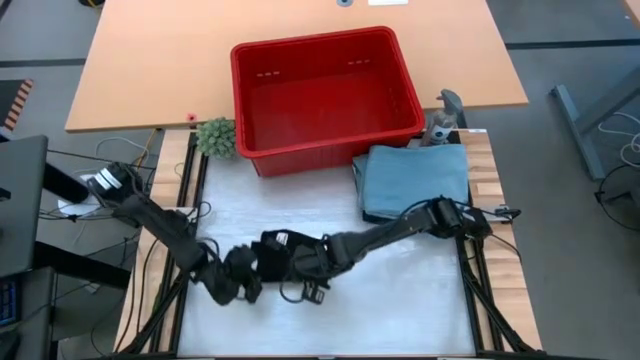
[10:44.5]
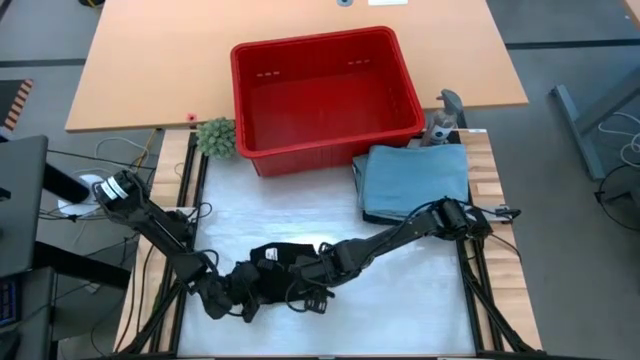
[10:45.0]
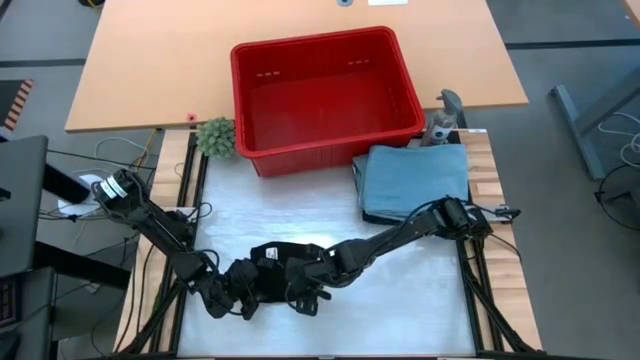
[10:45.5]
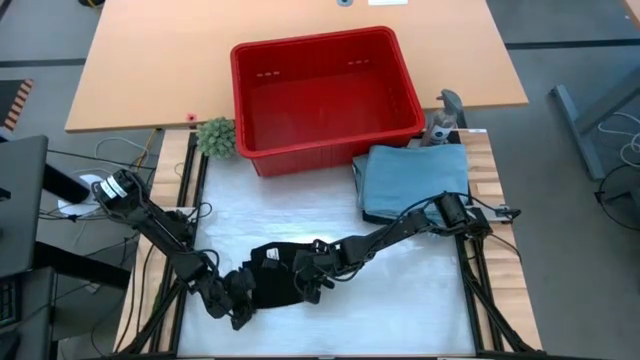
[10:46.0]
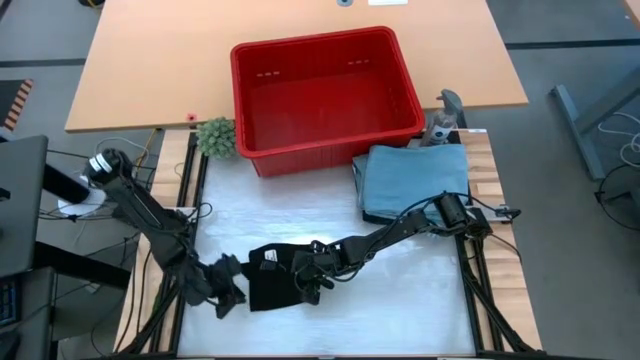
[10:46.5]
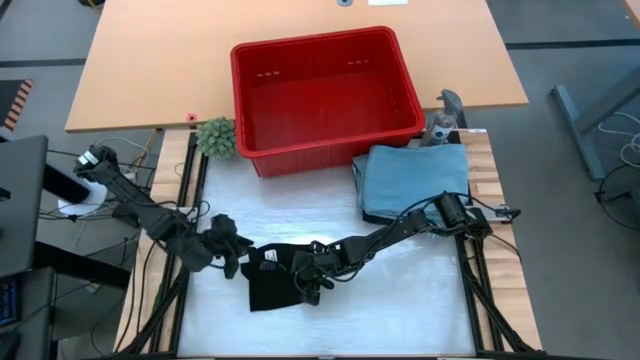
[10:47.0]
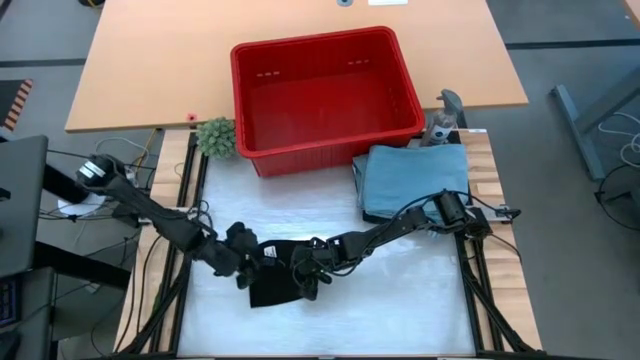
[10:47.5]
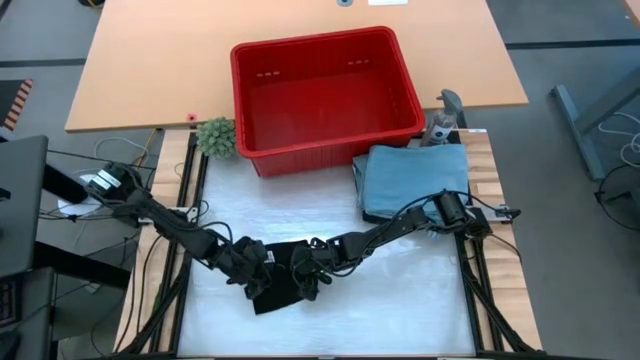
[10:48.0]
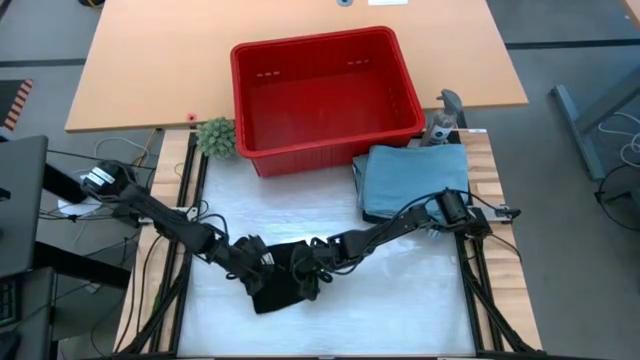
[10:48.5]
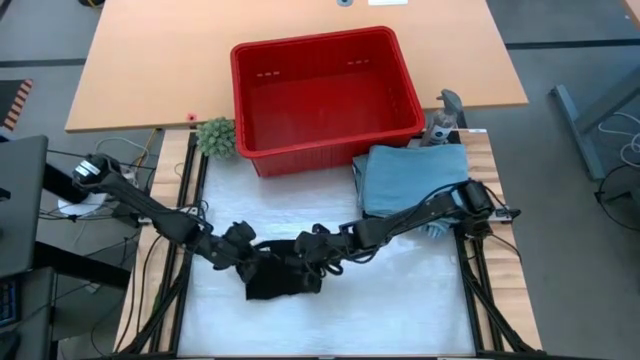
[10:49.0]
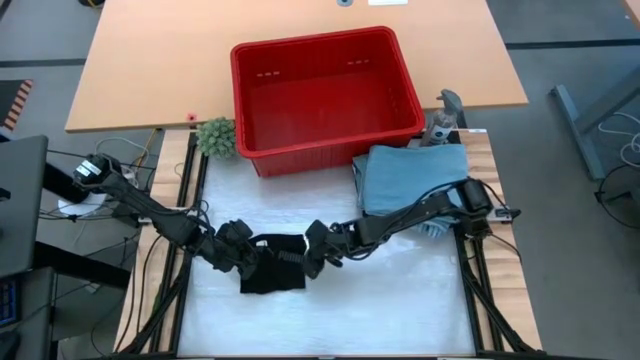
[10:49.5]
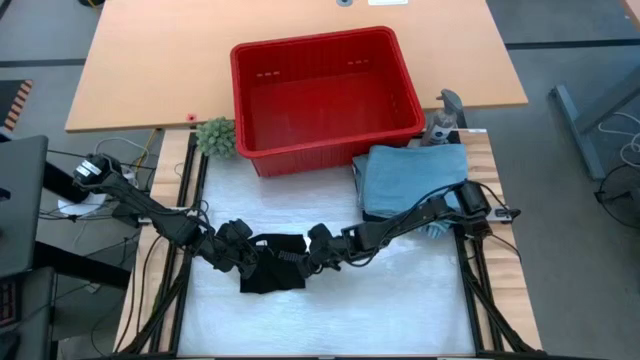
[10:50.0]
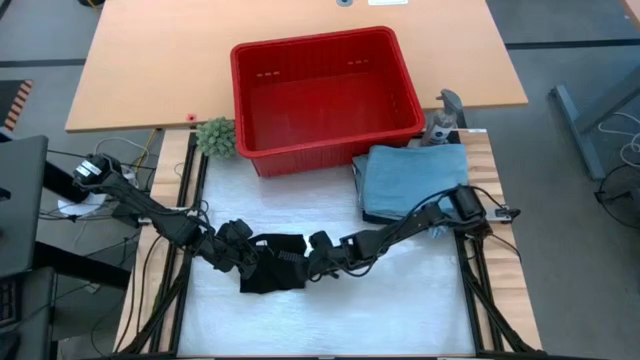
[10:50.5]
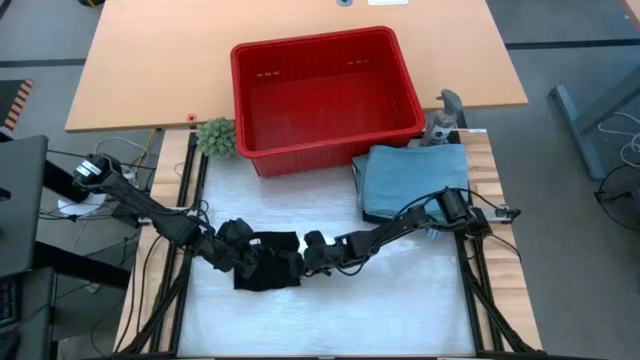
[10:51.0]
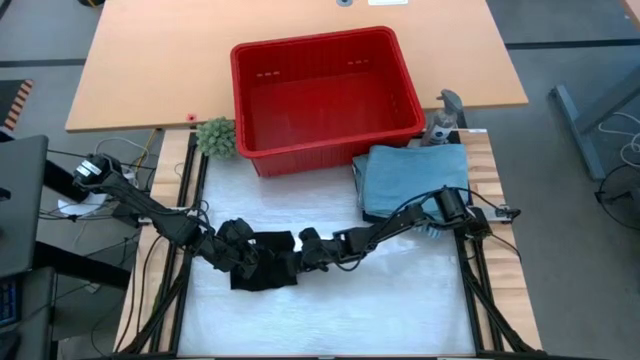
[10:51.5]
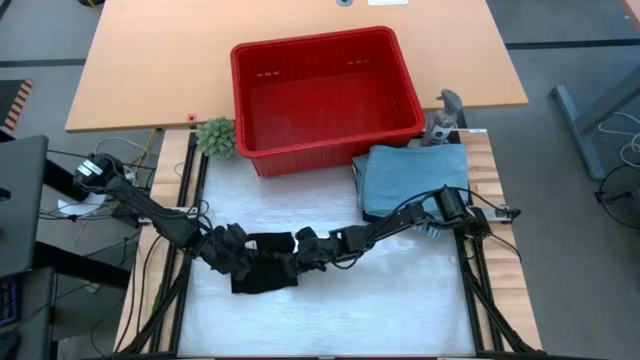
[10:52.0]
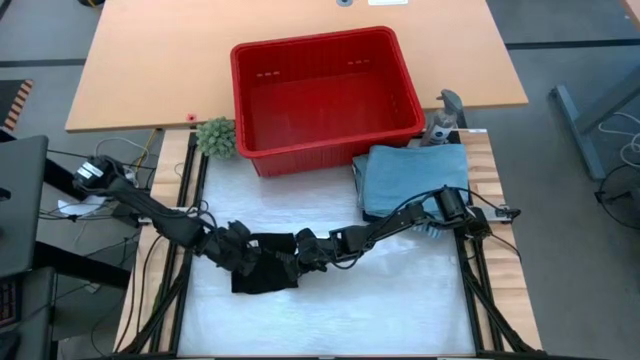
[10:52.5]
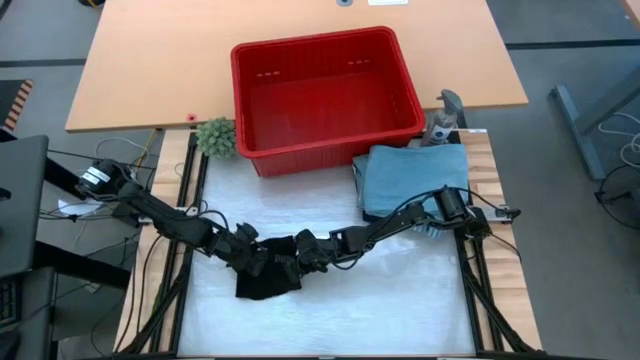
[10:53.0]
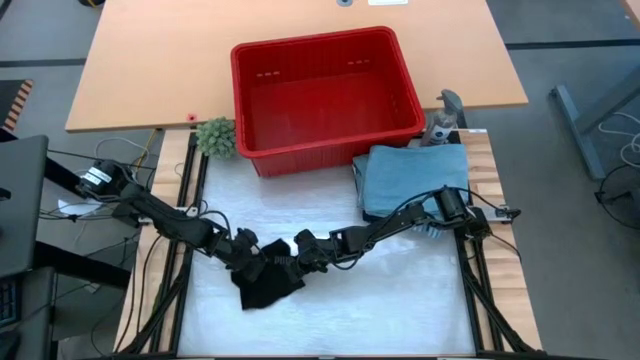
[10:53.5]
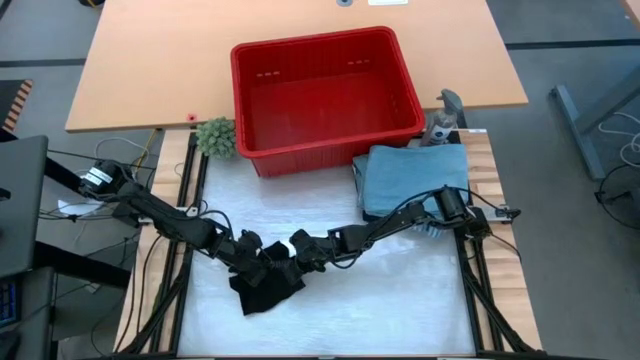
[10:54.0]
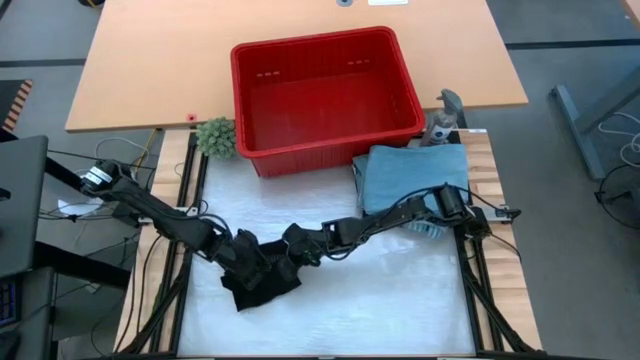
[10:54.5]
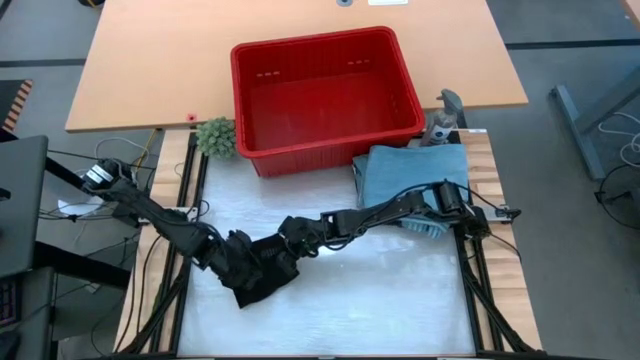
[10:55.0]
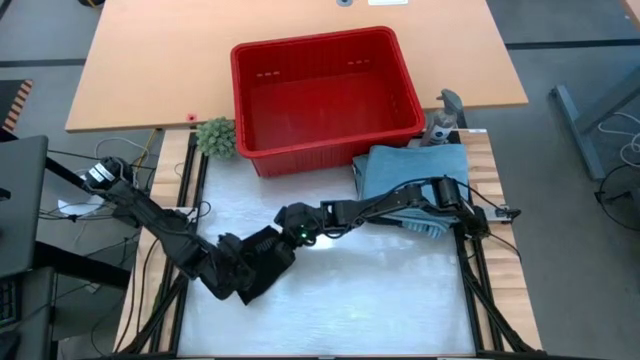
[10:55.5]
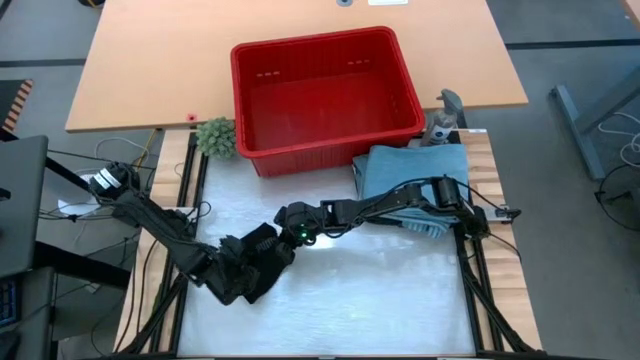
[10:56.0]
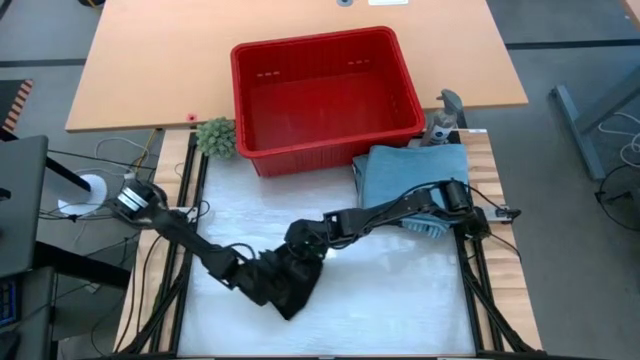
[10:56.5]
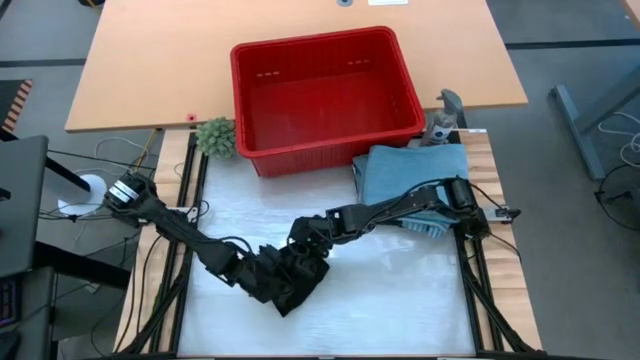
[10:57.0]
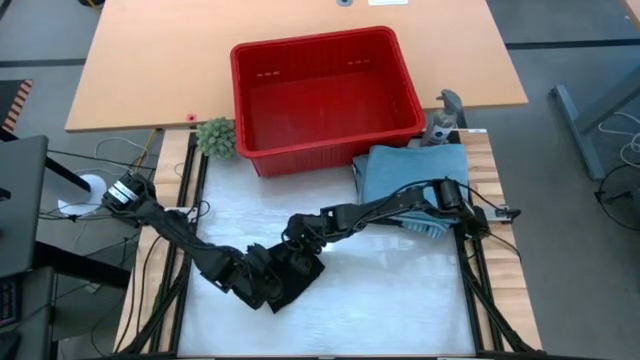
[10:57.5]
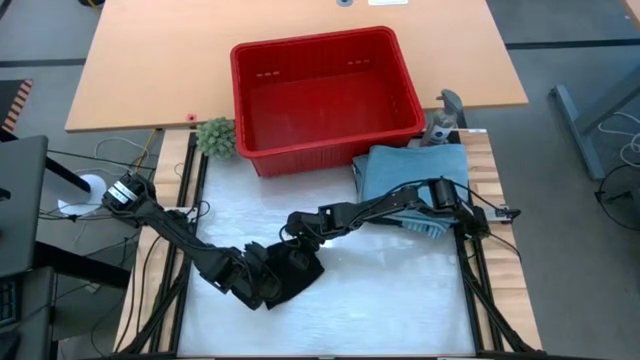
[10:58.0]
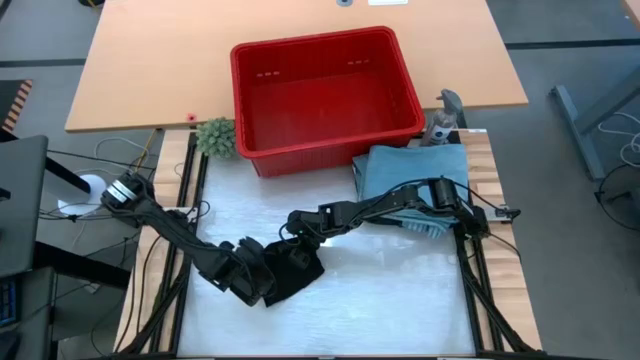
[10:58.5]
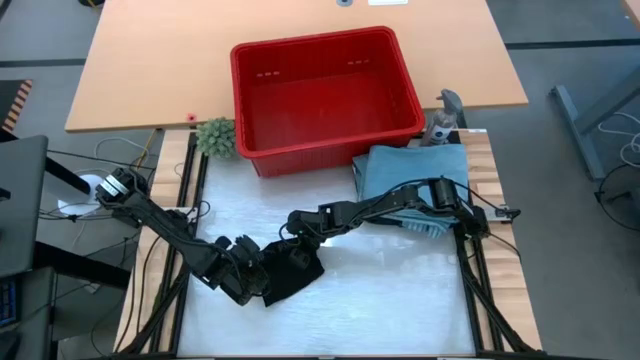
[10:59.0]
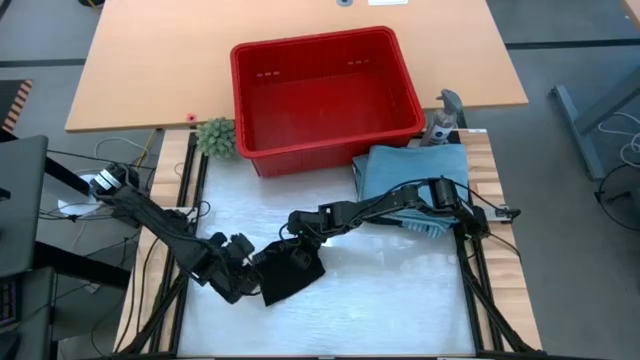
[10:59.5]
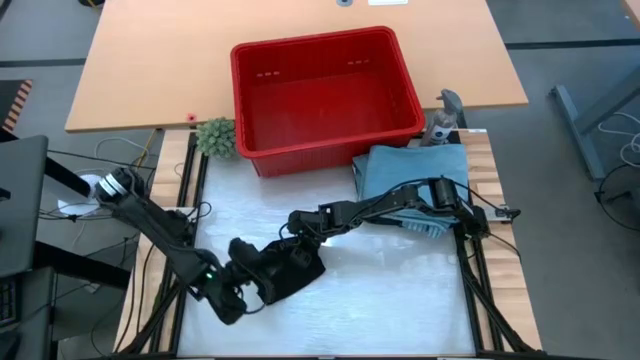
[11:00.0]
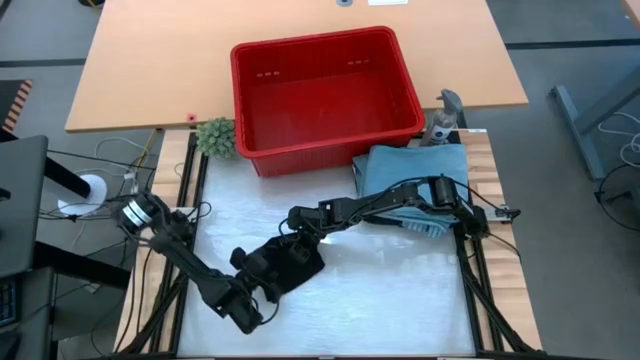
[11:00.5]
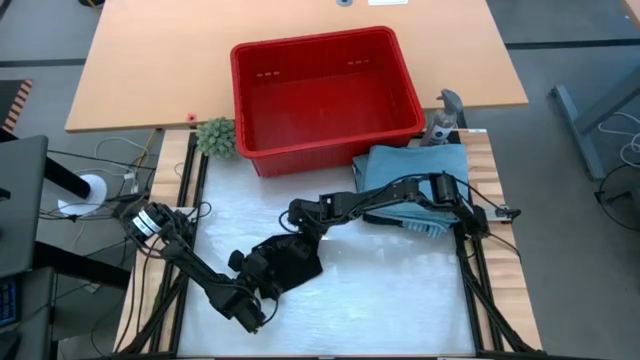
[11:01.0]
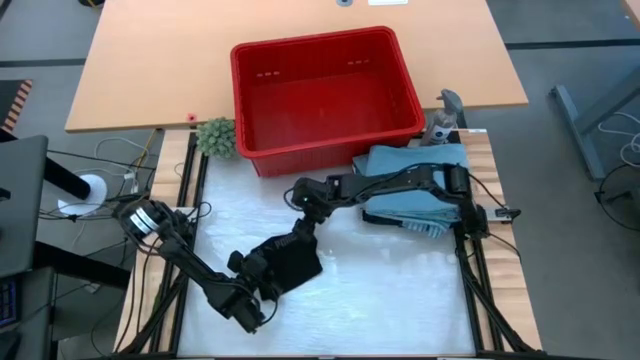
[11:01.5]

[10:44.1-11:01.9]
Task: Fold Laundry from Bin
Fold the black boxer short
